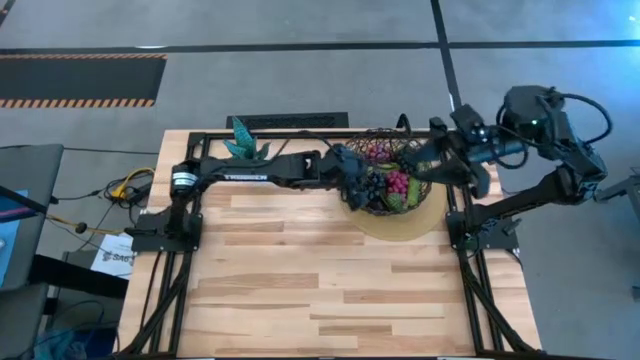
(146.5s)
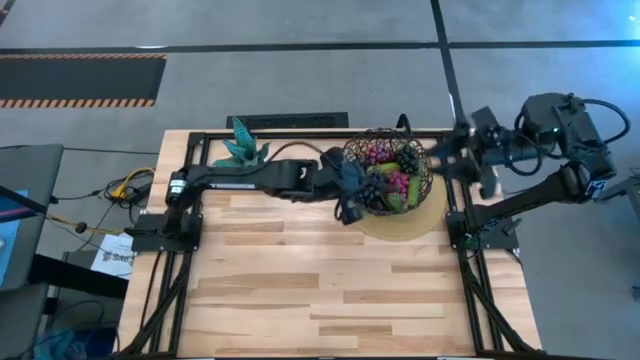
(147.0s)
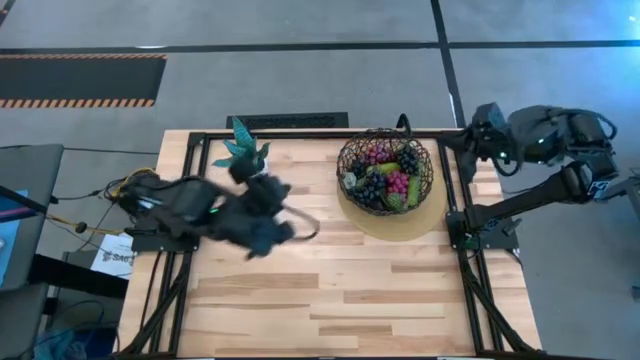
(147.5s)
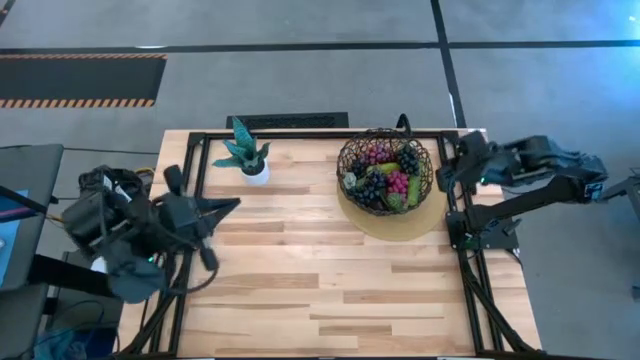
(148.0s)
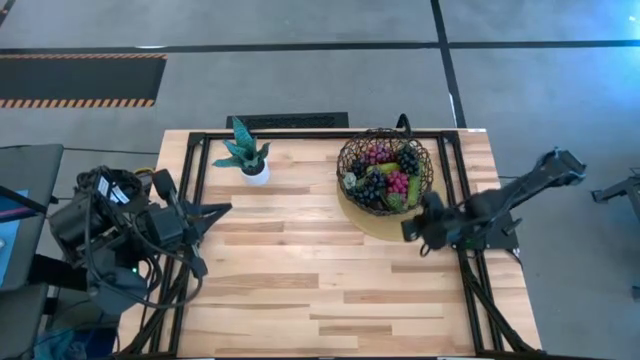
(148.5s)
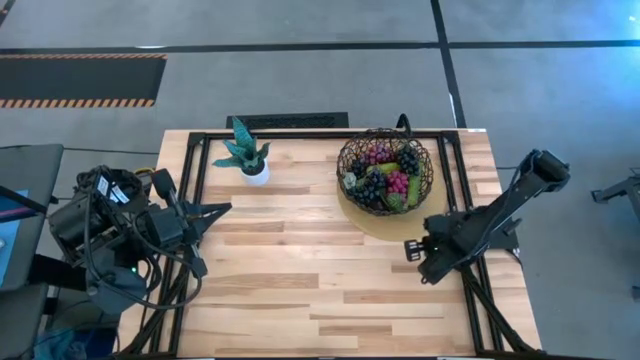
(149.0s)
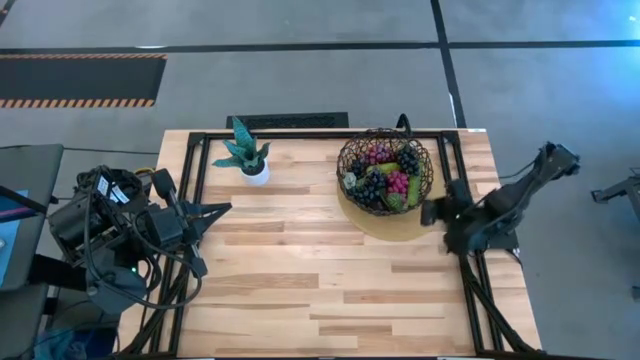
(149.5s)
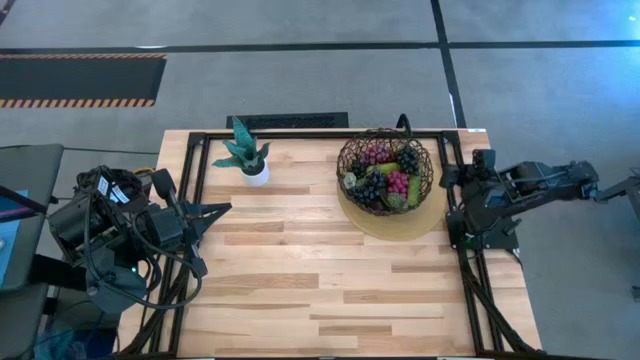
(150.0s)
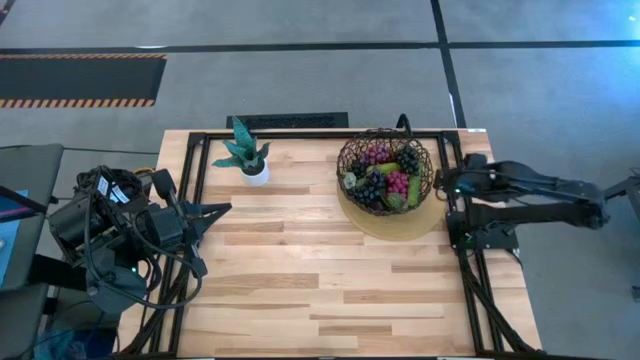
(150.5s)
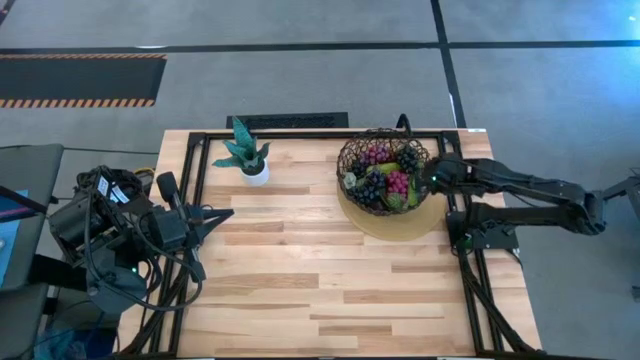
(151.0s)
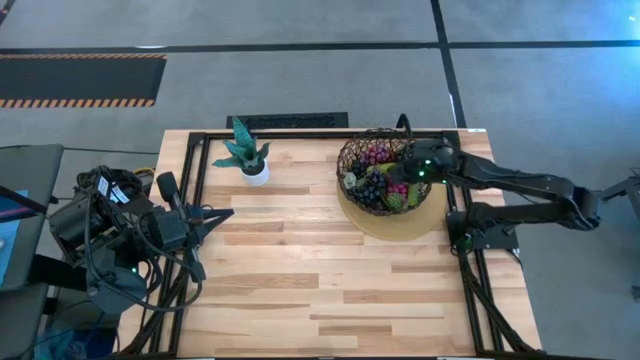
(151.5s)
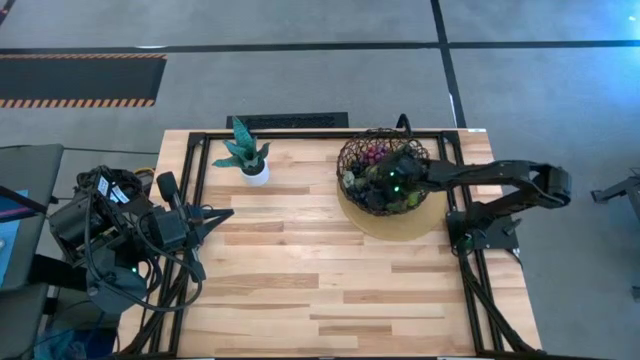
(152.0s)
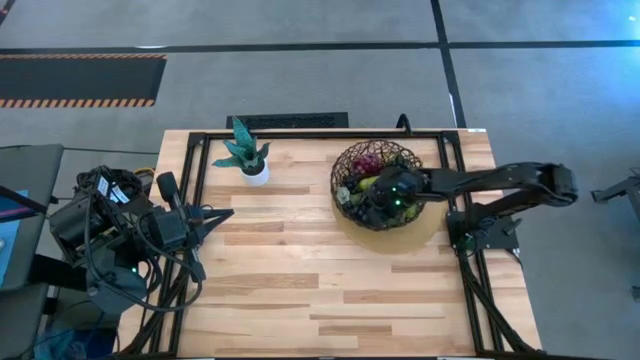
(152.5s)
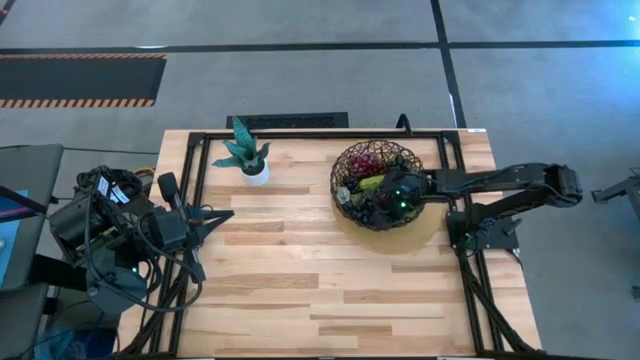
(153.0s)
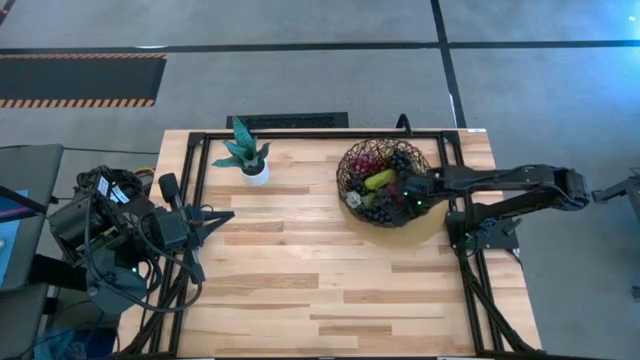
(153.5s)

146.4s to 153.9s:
Task: Build produce basket
Adjust the grapes in the black wire basket

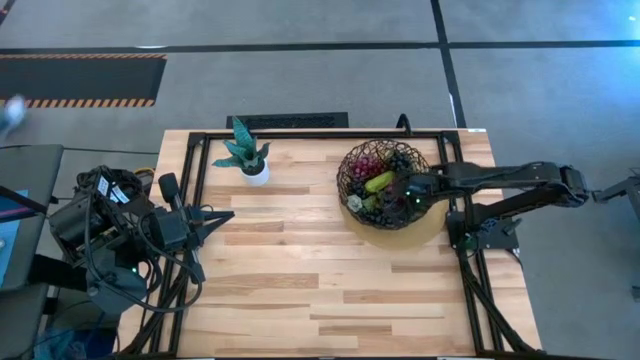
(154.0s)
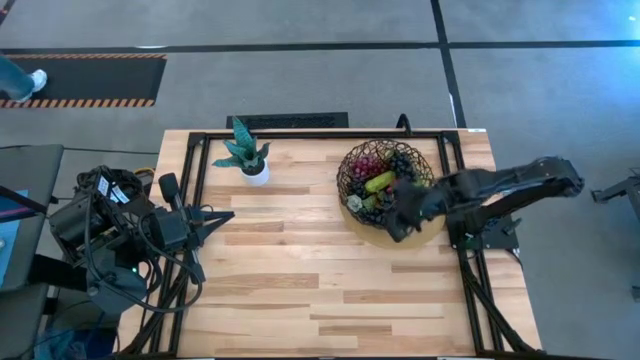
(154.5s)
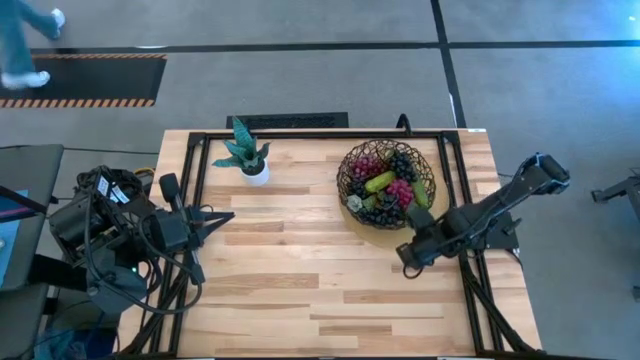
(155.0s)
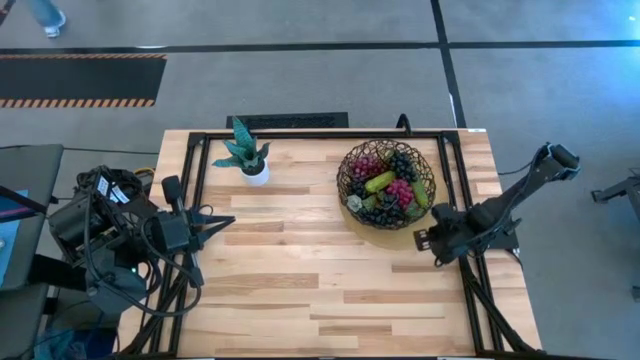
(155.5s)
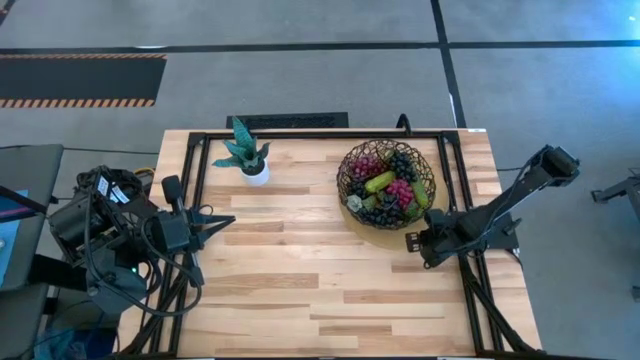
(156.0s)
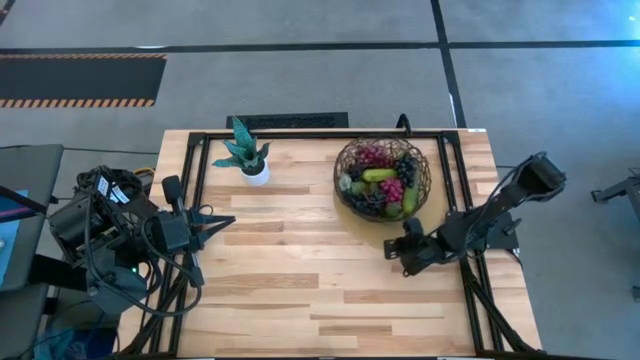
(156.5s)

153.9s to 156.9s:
Adjust the brown placemat

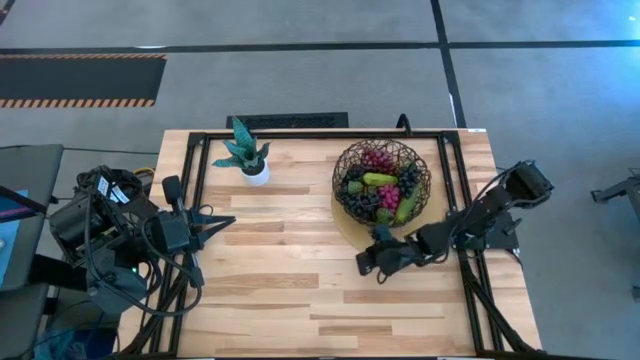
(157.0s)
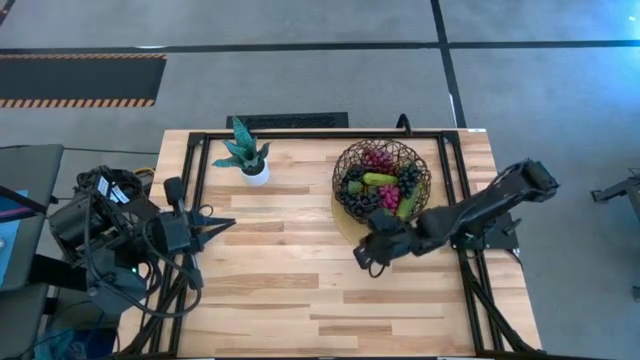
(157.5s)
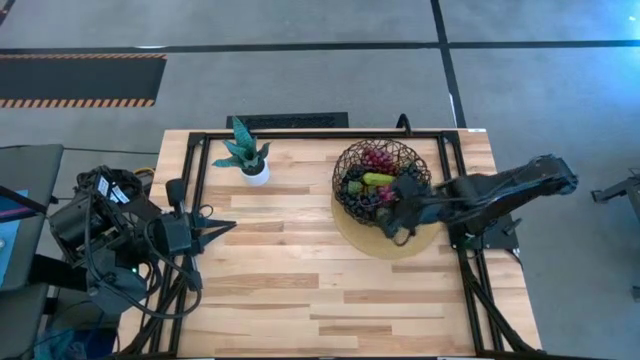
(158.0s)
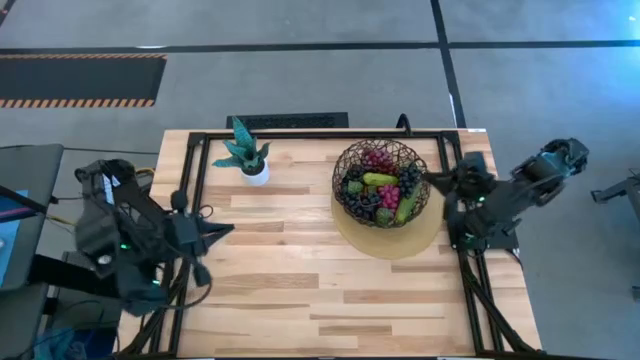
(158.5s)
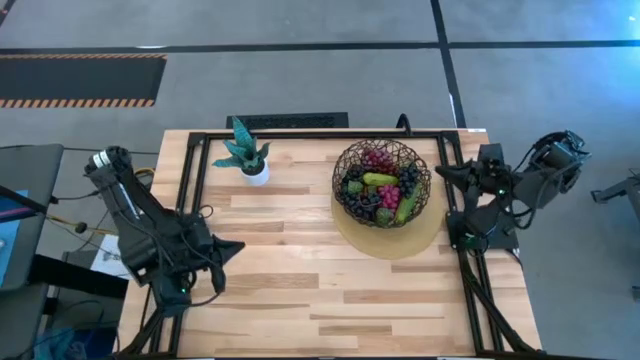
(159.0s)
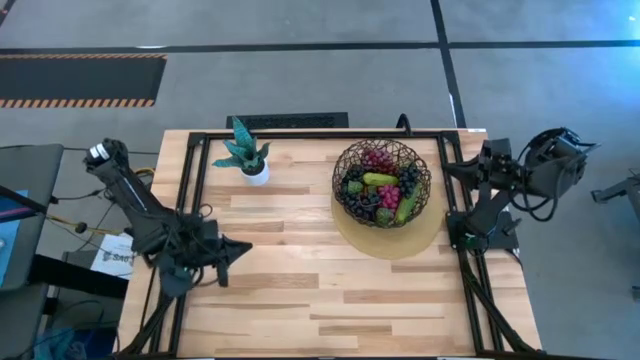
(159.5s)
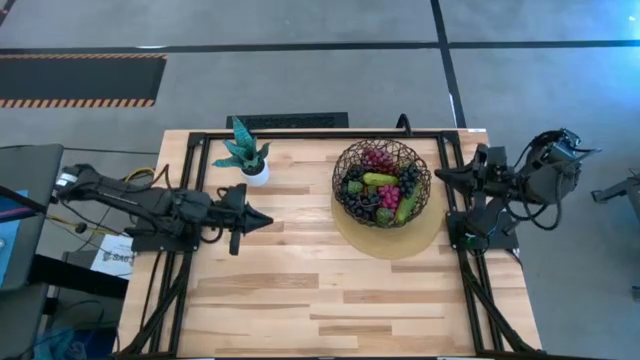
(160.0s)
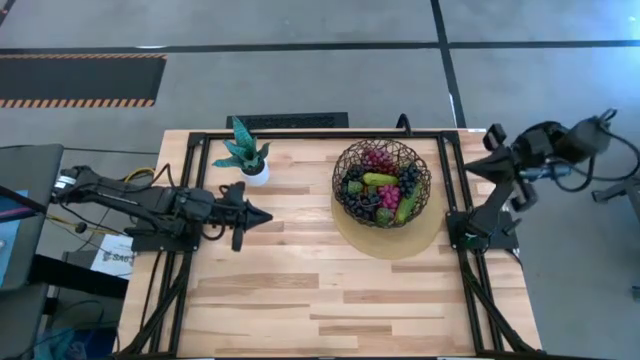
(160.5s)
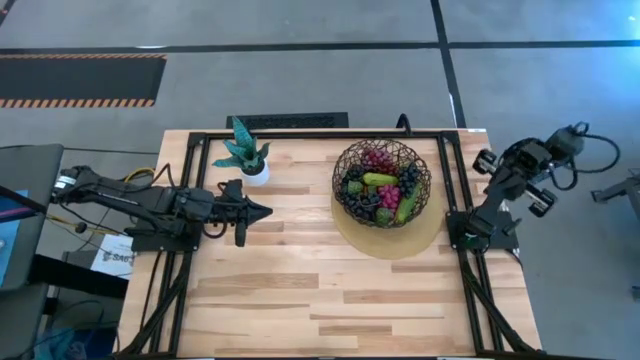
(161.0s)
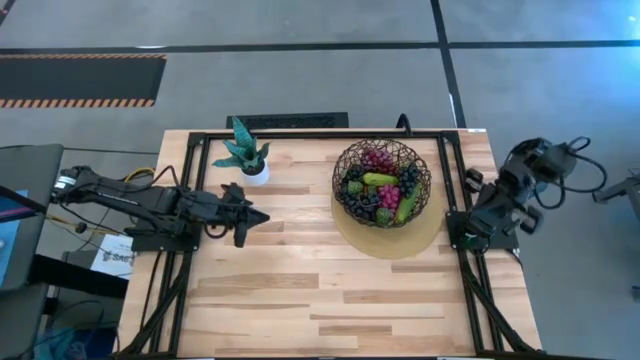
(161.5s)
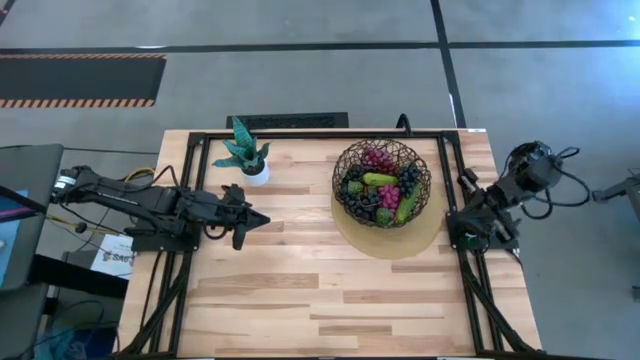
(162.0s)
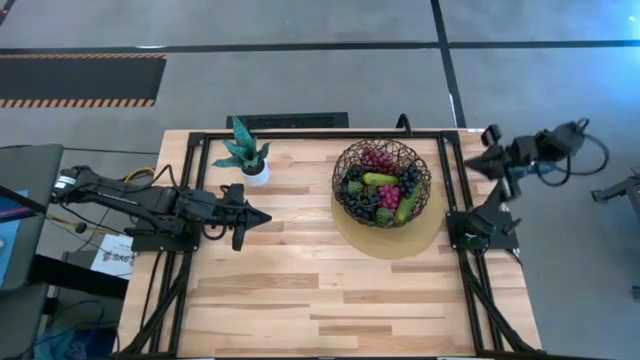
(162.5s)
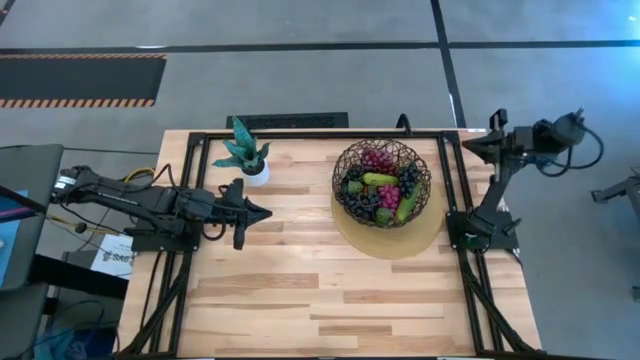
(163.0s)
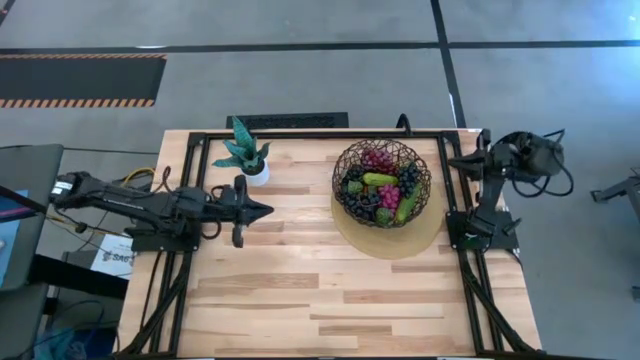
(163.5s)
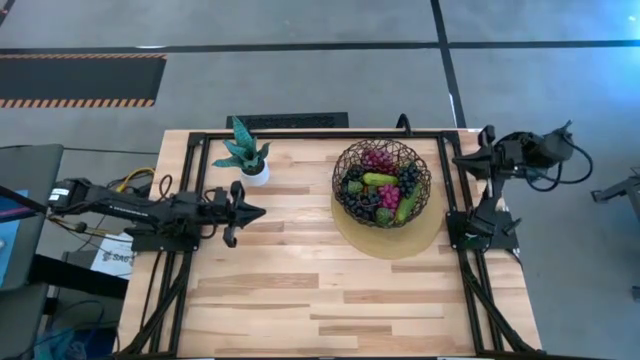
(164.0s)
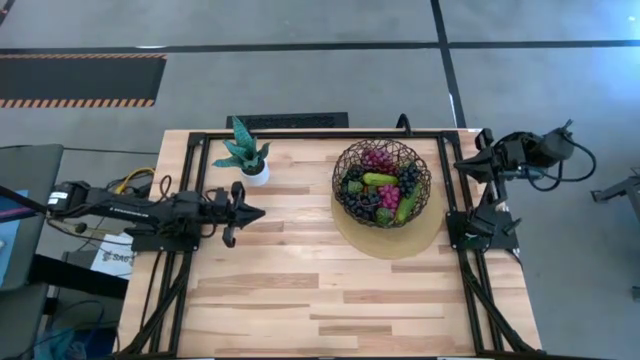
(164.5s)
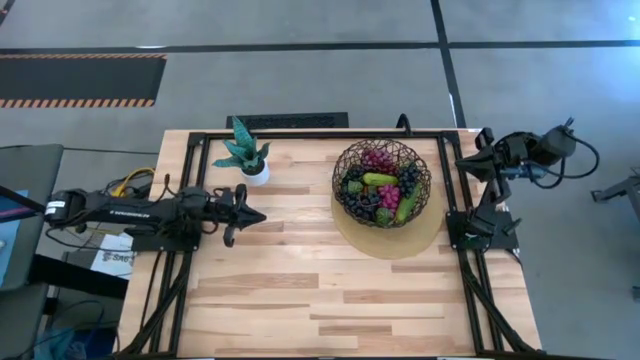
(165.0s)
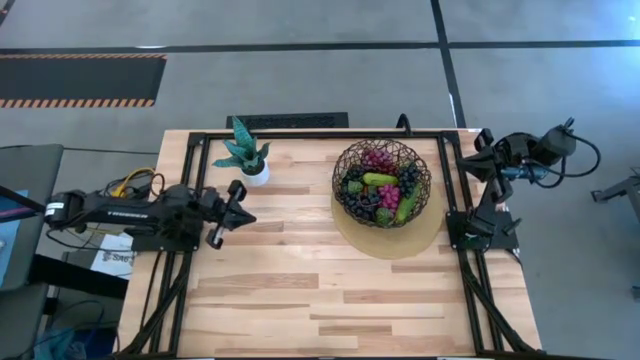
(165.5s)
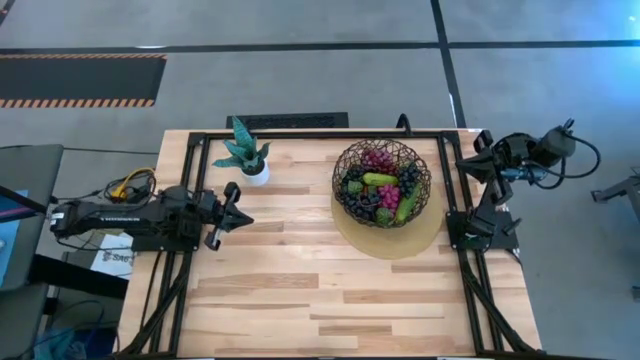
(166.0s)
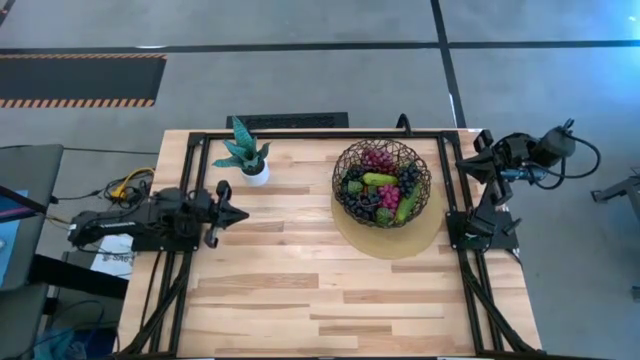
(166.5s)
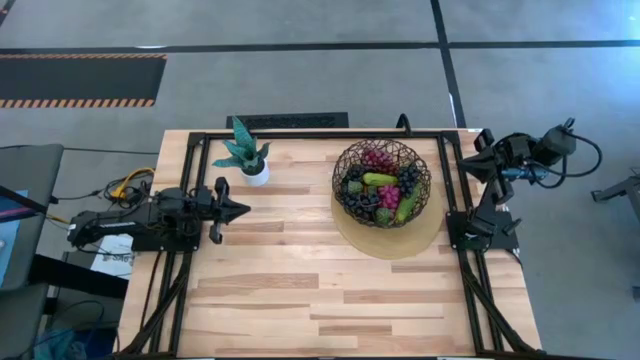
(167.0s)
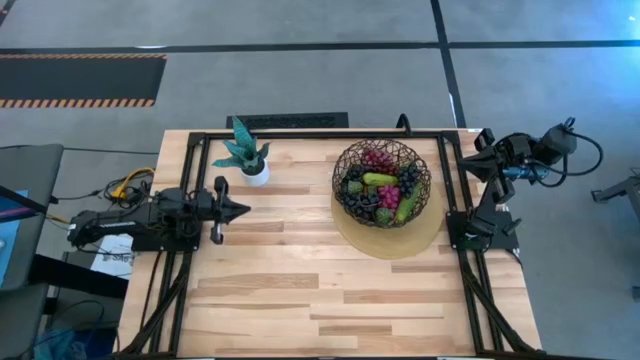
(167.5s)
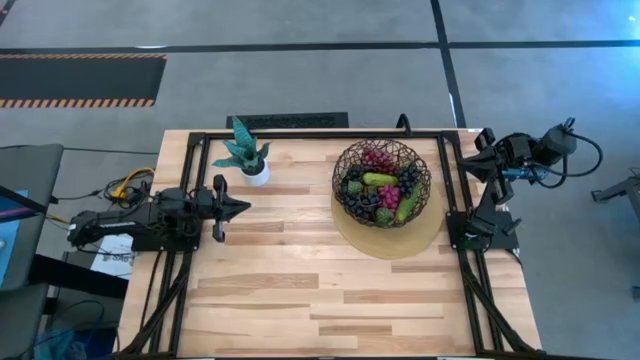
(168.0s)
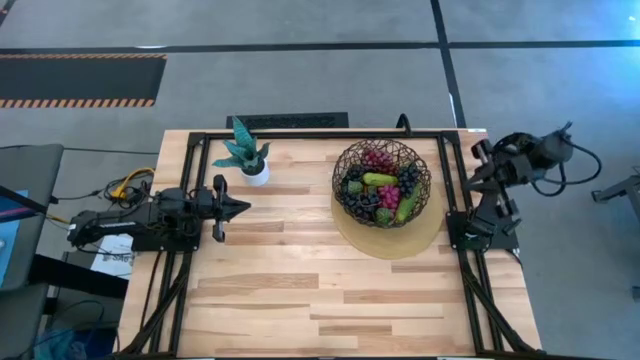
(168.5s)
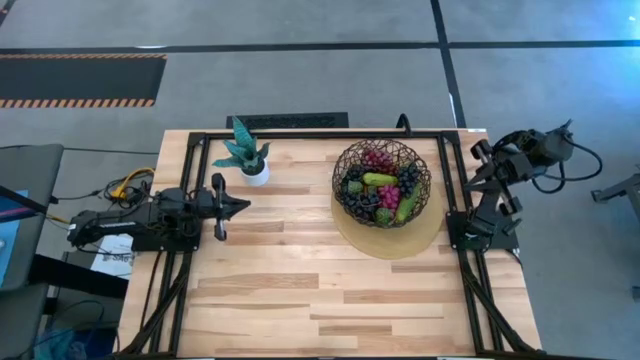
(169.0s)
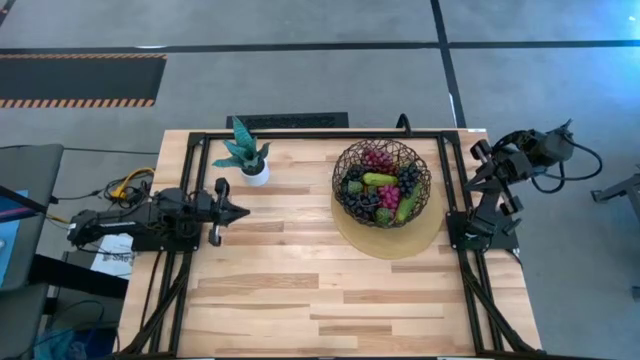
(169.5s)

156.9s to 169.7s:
Return to Home Position
